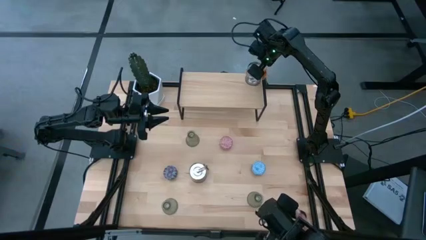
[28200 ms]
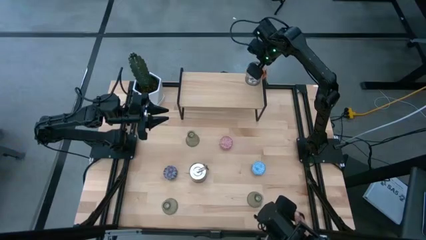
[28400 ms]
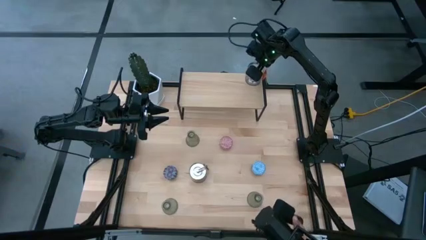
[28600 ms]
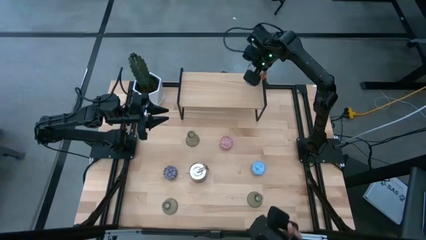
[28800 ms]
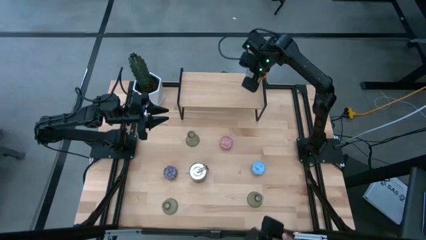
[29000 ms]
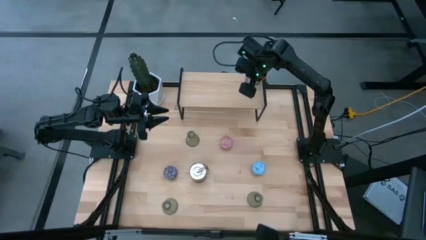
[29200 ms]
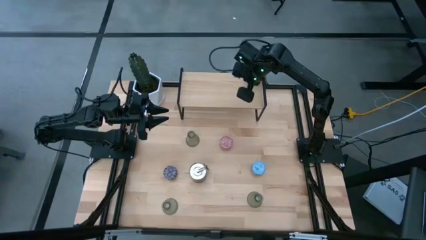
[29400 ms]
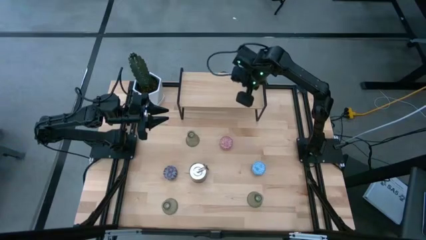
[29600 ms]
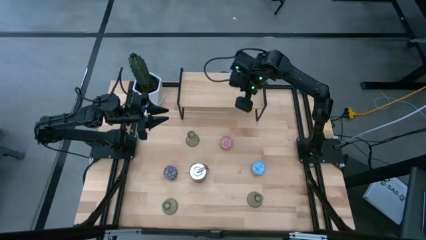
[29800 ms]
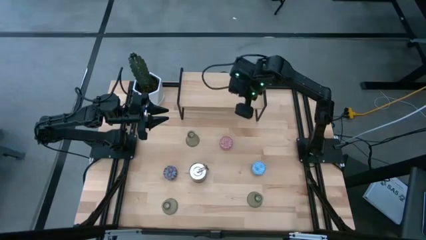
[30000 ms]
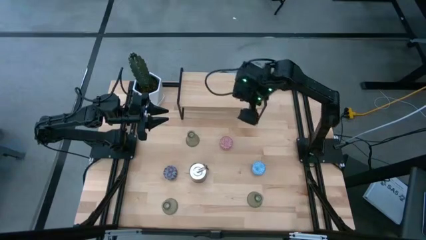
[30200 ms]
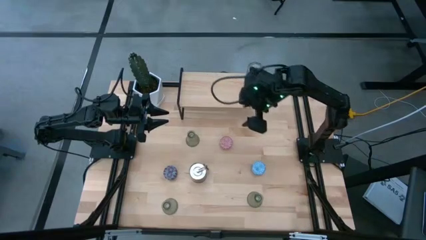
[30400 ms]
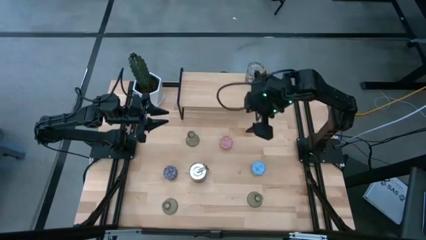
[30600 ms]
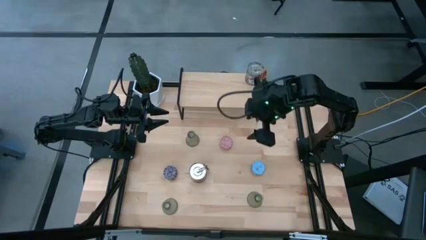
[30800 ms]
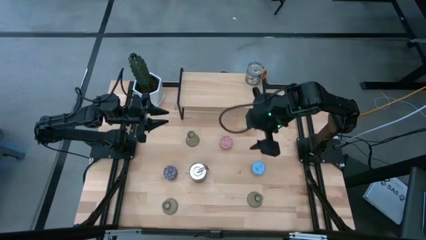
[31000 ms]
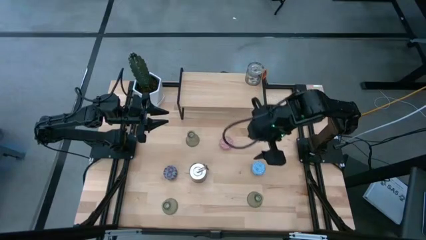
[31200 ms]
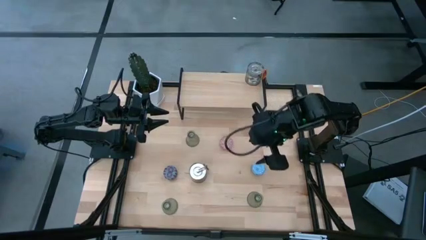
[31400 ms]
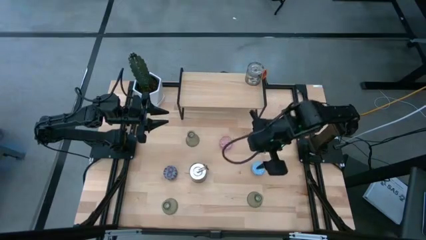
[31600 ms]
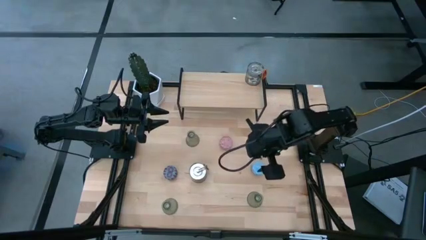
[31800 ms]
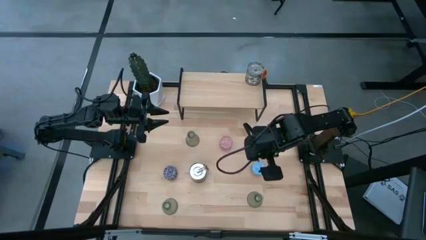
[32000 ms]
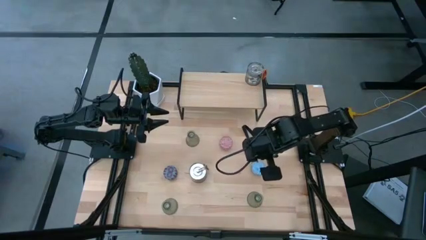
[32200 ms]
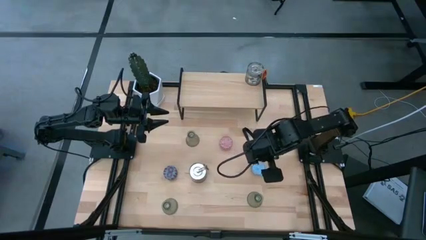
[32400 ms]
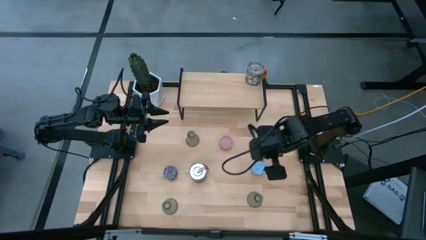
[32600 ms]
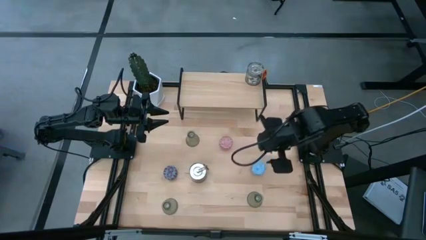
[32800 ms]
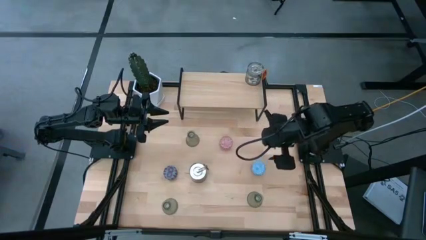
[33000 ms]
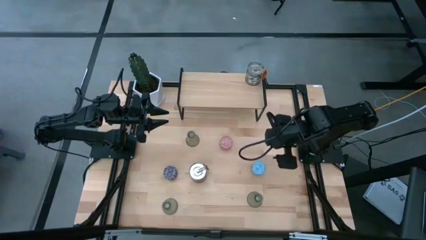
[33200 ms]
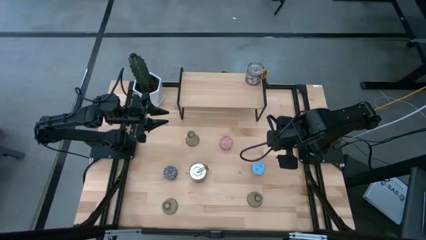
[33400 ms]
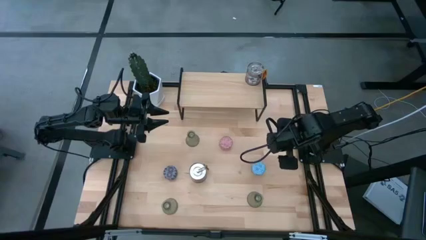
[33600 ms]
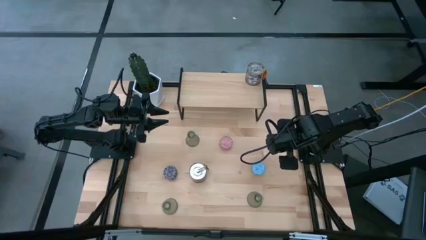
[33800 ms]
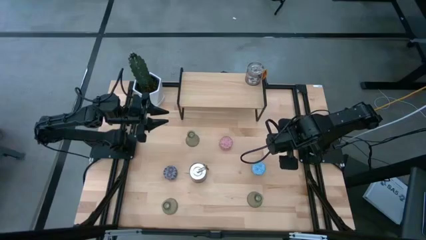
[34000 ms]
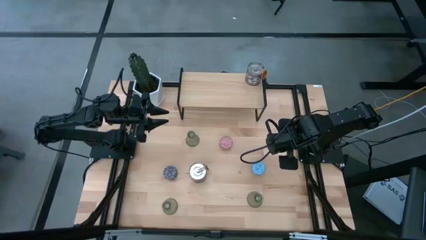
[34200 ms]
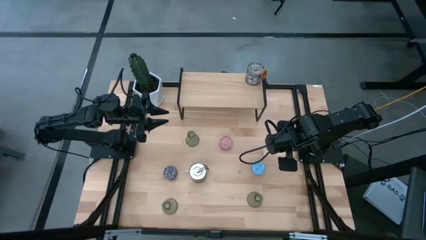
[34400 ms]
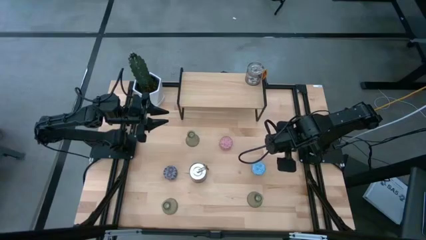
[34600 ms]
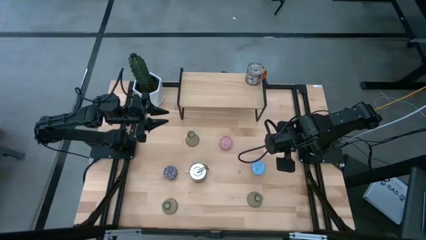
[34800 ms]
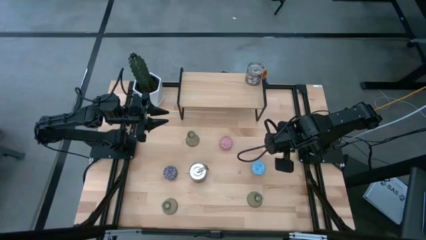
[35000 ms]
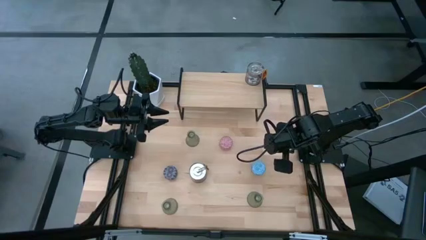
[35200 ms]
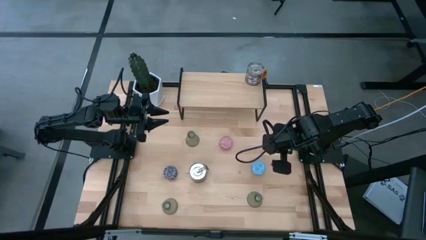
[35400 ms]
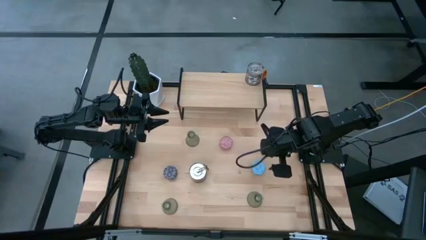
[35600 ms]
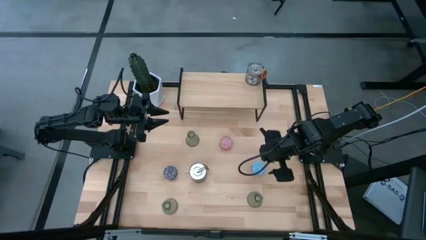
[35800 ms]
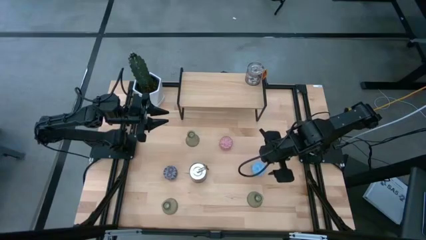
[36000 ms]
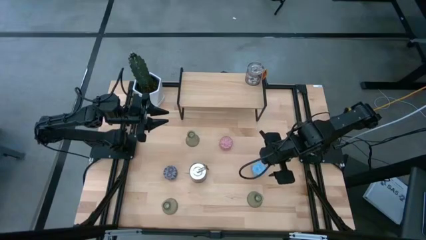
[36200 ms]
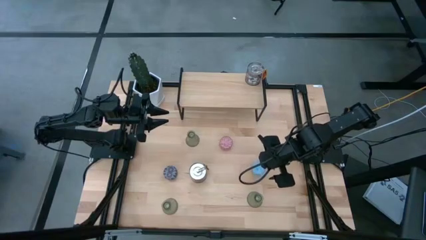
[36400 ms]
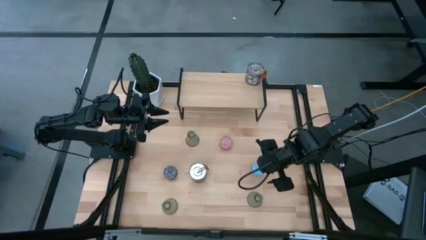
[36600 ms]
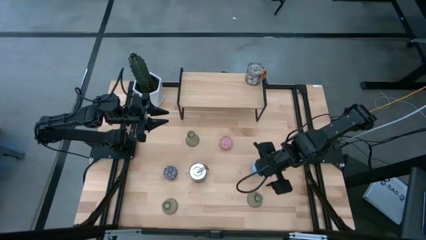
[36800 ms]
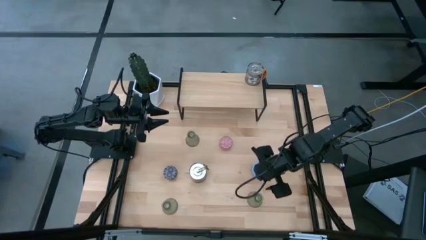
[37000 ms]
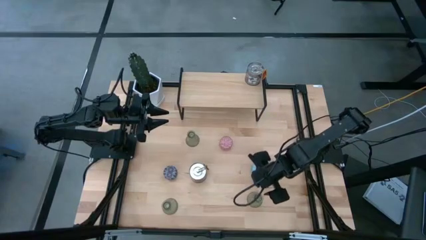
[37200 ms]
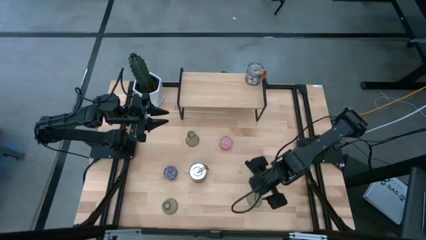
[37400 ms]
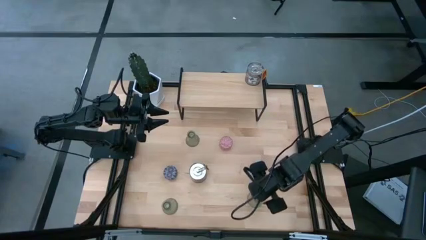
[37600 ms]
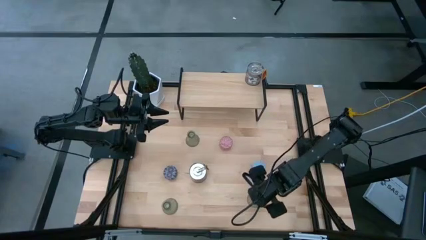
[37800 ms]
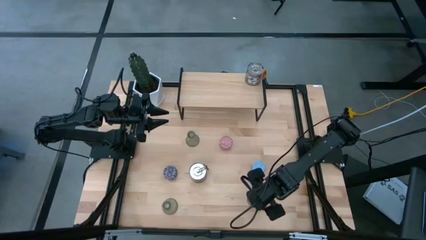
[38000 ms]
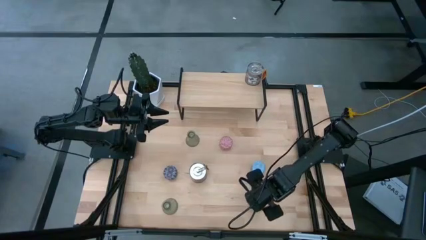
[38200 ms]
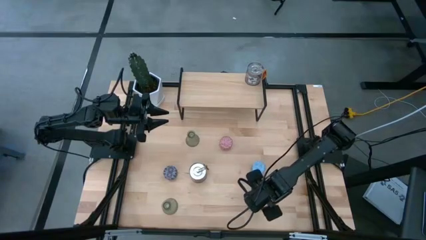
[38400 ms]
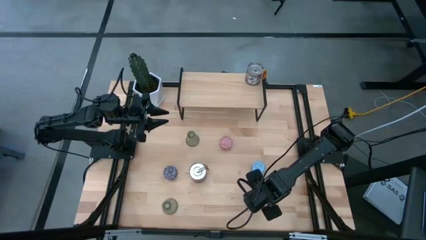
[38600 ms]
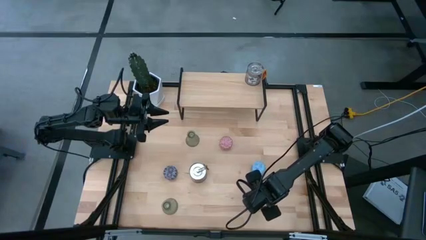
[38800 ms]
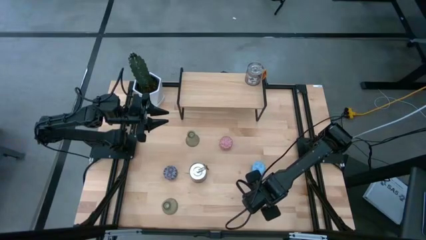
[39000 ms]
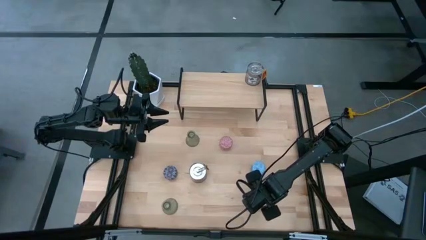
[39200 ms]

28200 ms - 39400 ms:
Task: Pick & Place candle stick holders
Put the right green glass candle holder on the shelf
